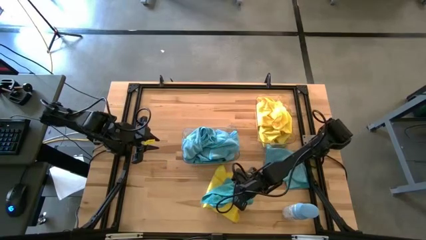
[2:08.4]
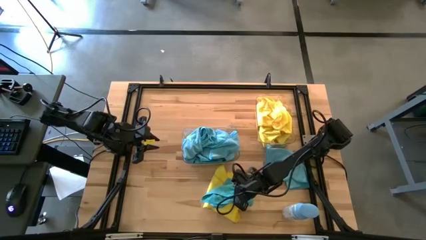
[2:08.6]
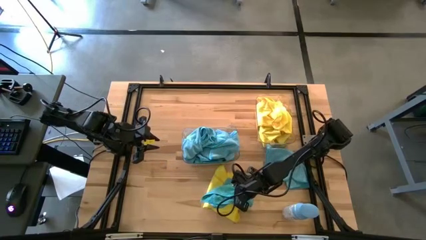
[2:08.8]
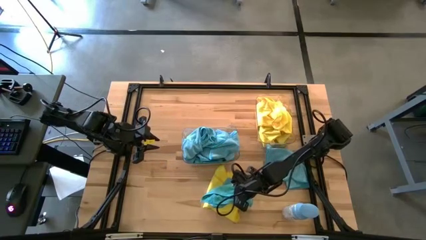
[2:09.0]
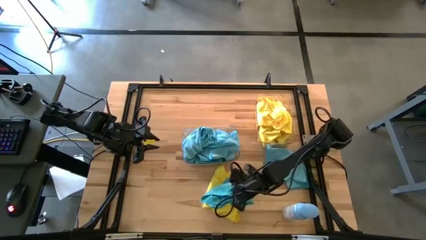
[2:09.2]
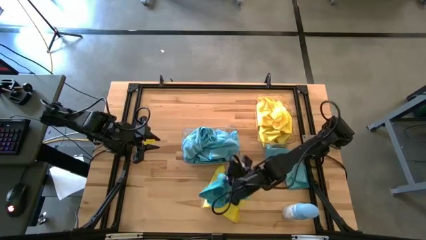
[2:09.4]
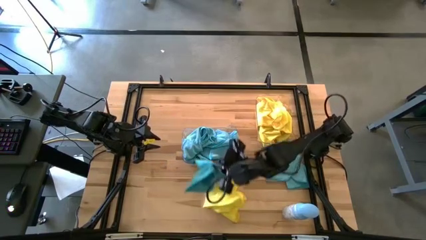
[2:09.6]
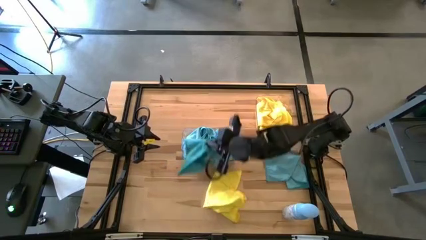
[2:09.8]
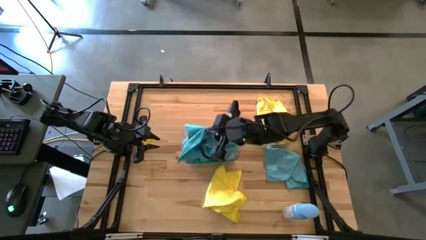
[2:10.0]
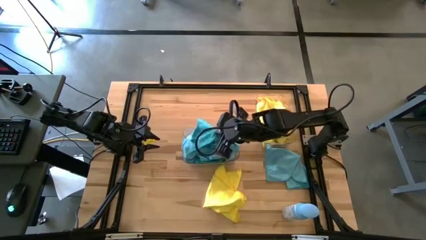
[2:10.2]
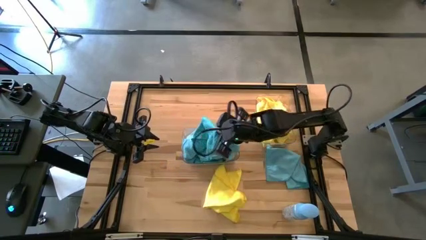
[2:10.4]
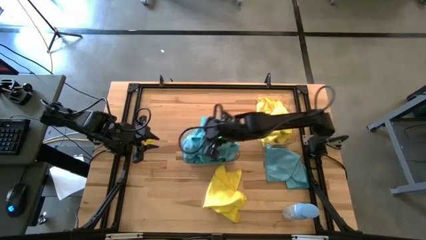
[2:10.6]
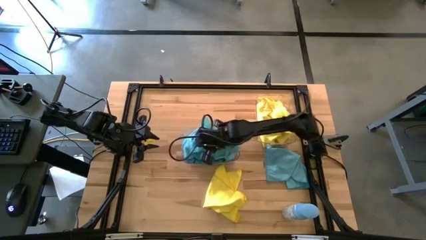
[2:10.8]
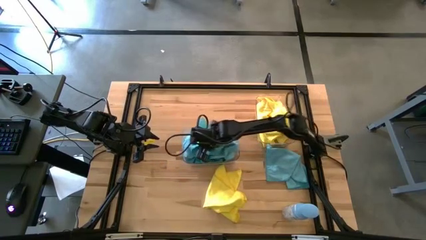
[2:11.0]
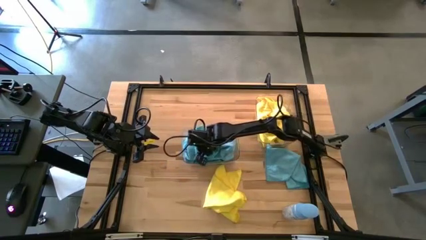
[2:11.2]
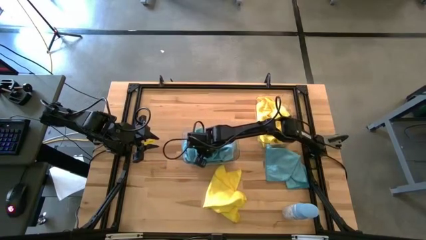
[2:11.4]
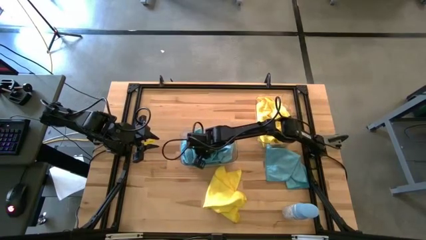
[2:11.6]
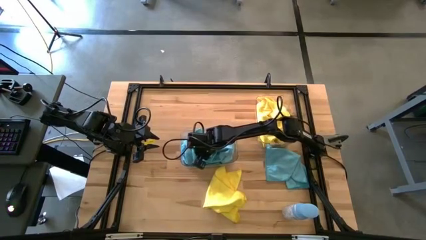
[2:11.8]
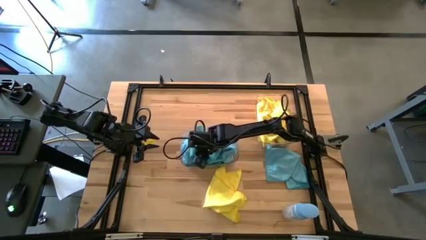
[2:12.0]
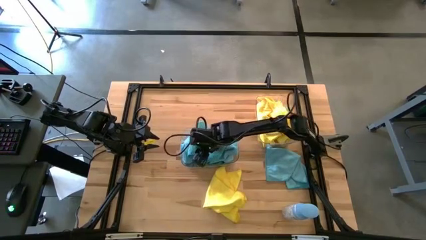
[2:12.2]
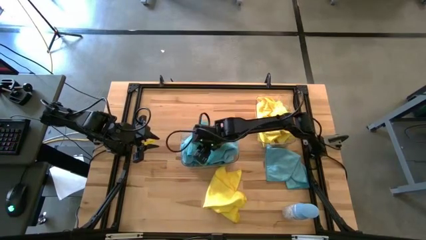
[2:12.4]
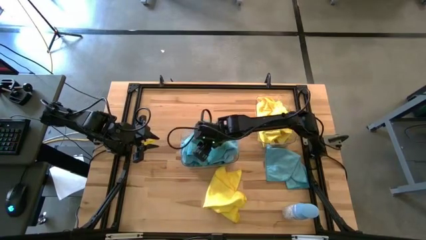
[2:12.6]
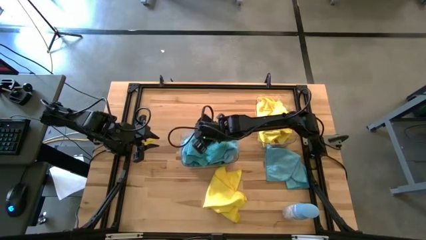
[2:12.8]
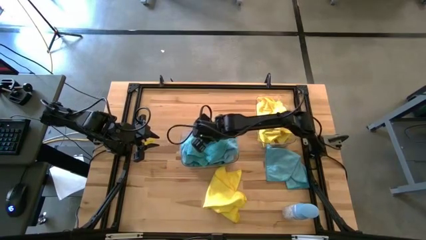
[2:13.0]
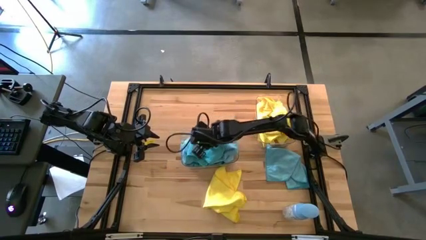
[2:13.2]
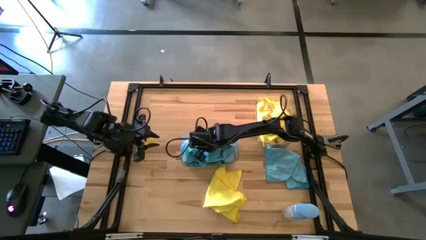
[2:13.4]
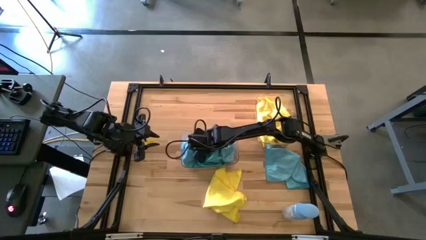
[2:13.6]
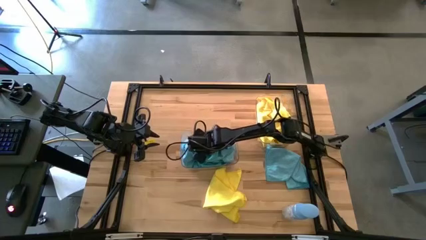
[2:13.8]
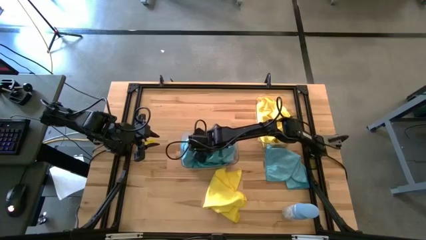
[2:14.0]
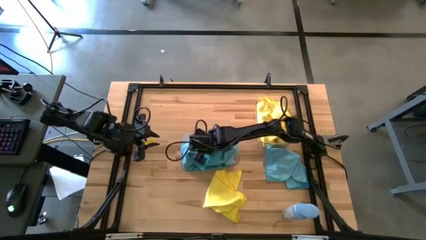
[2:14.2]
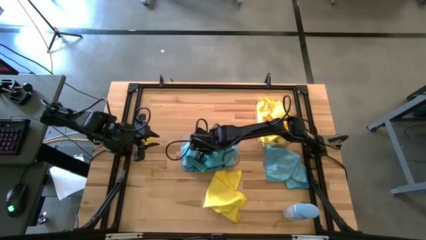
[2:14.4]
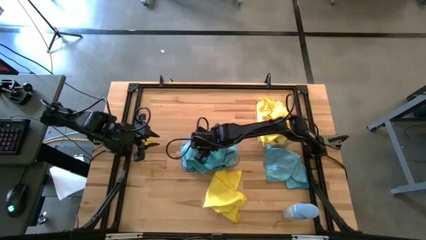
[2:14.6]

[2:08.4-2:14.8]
Task: Sort microfiber towel by color & place in baskets
Put the blue towel into the bottom transparent bin

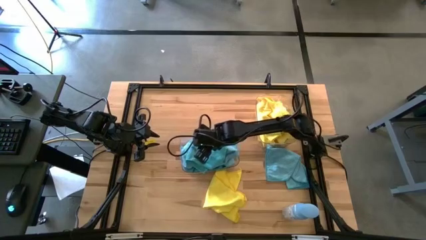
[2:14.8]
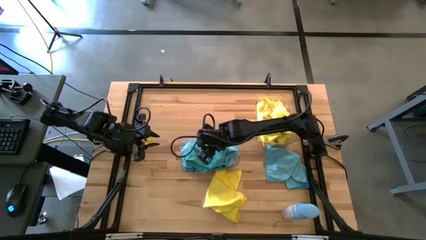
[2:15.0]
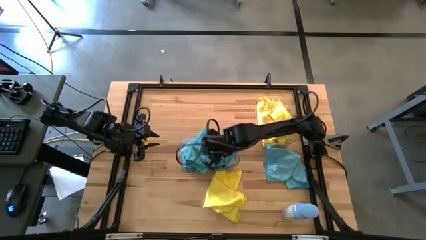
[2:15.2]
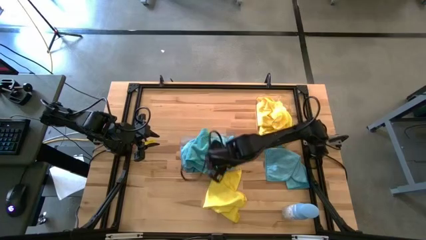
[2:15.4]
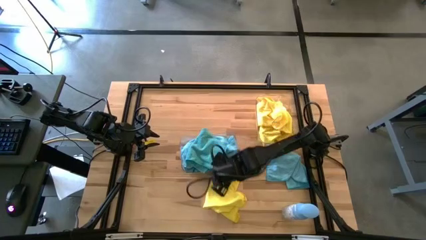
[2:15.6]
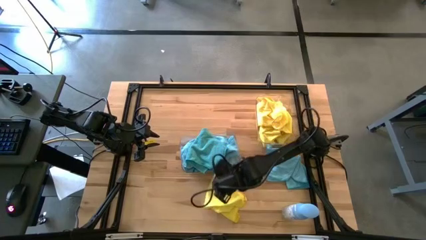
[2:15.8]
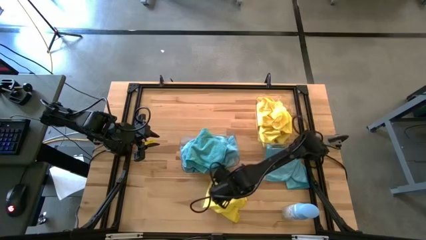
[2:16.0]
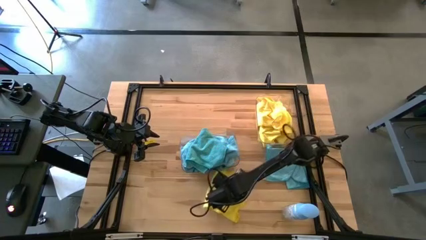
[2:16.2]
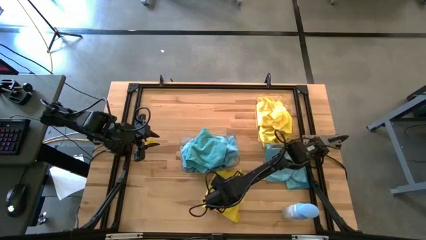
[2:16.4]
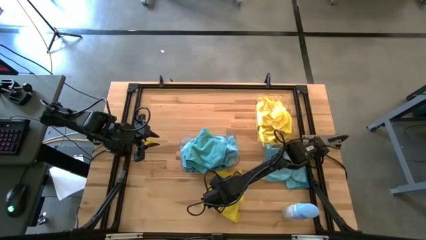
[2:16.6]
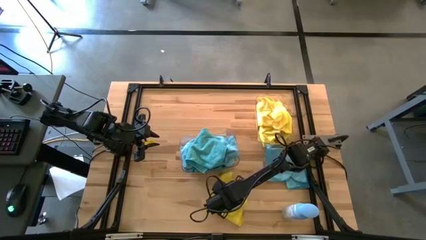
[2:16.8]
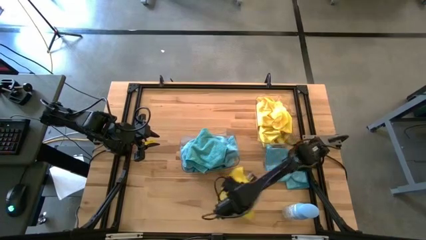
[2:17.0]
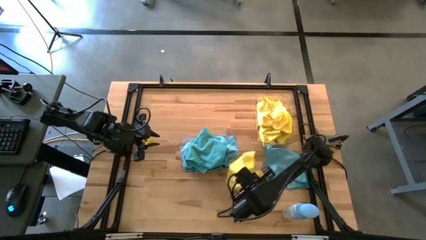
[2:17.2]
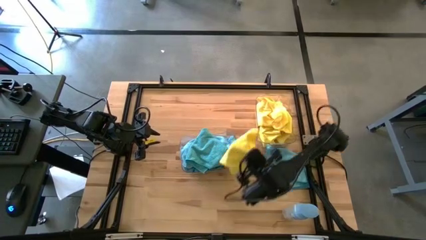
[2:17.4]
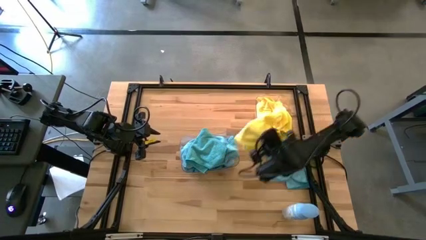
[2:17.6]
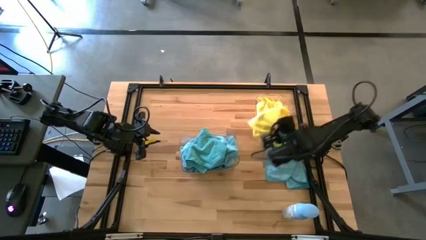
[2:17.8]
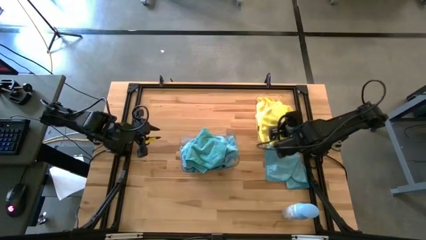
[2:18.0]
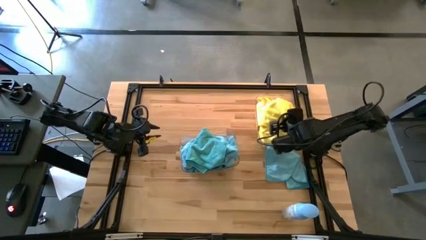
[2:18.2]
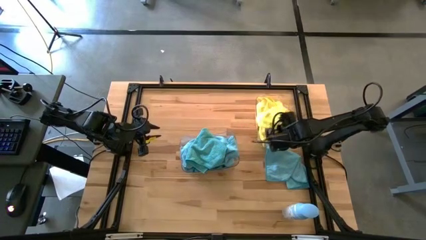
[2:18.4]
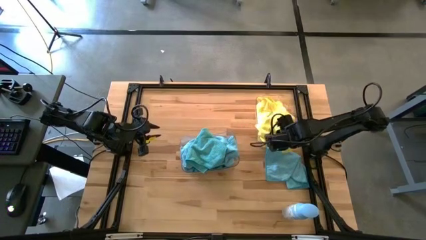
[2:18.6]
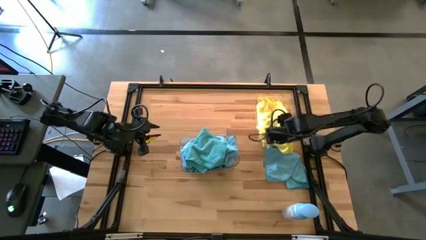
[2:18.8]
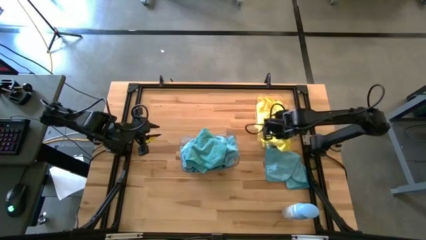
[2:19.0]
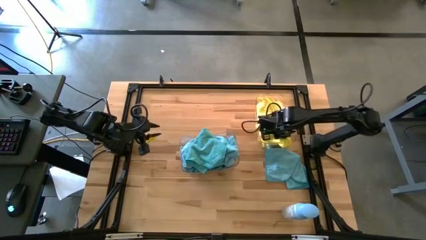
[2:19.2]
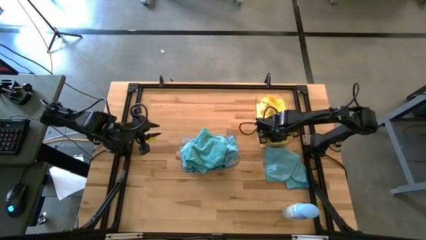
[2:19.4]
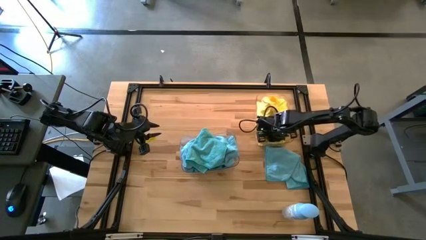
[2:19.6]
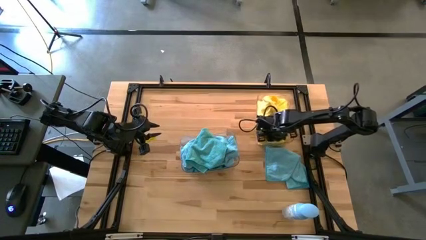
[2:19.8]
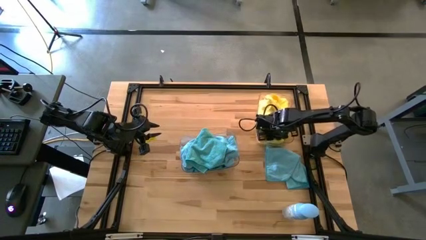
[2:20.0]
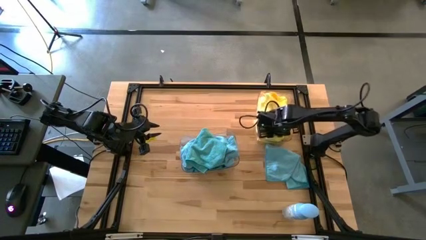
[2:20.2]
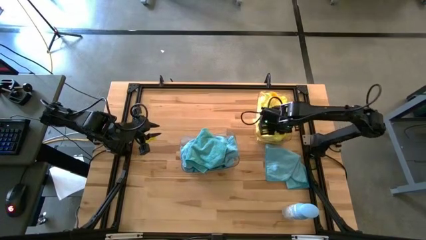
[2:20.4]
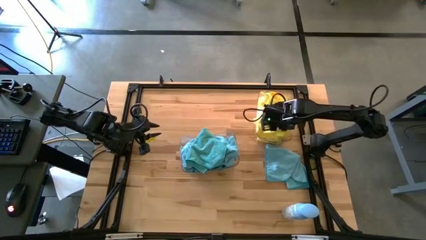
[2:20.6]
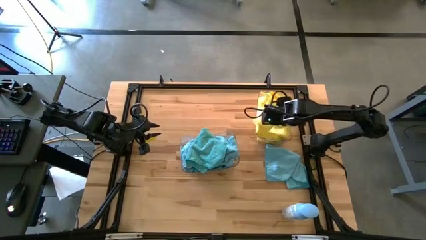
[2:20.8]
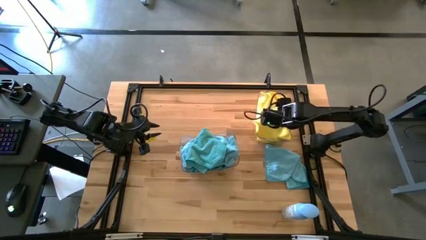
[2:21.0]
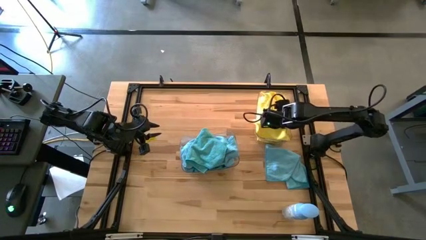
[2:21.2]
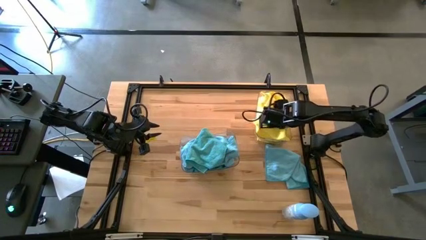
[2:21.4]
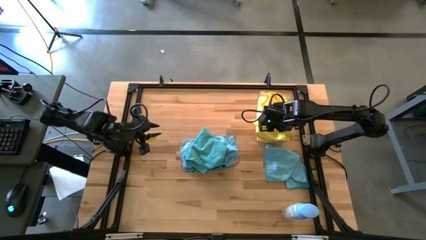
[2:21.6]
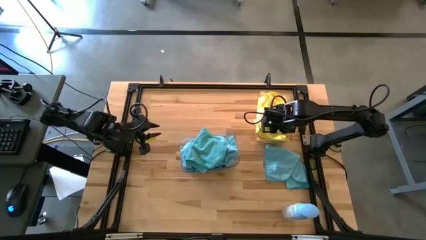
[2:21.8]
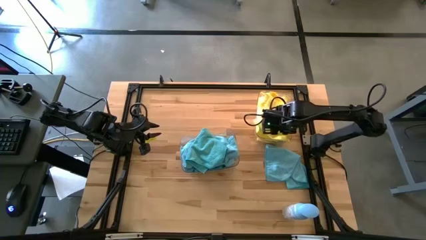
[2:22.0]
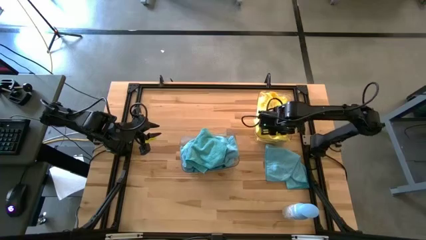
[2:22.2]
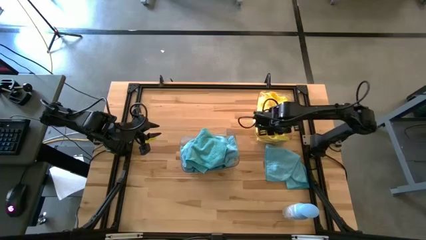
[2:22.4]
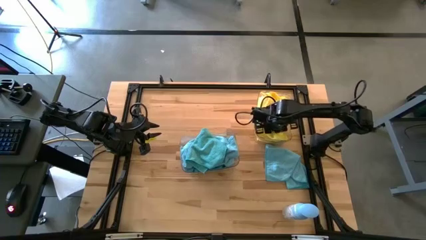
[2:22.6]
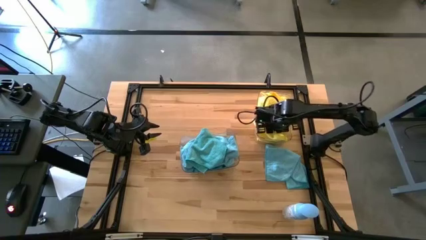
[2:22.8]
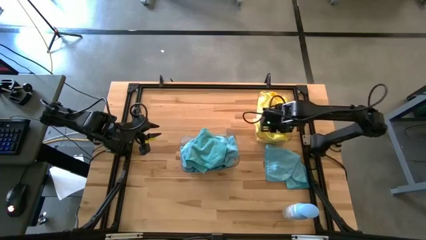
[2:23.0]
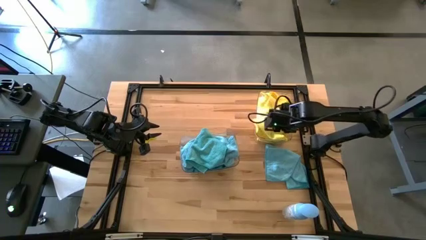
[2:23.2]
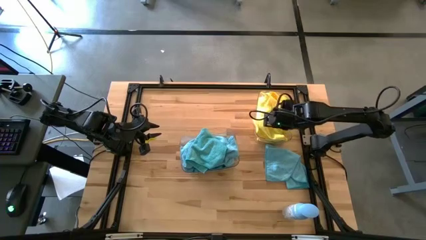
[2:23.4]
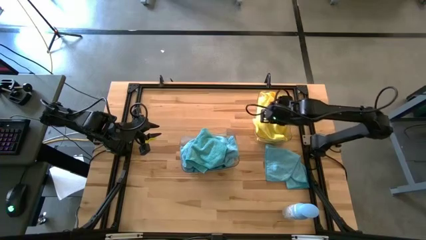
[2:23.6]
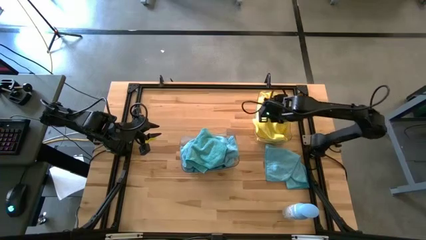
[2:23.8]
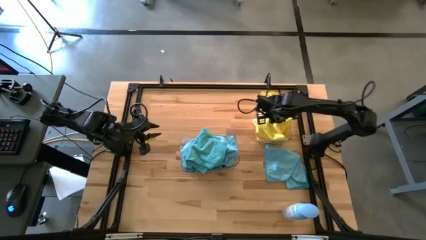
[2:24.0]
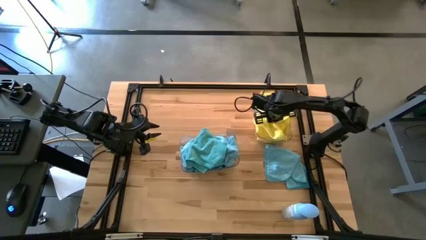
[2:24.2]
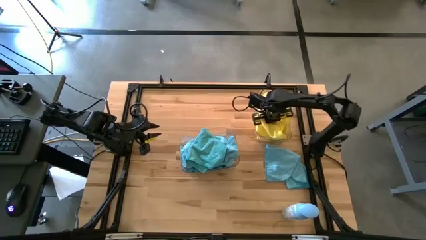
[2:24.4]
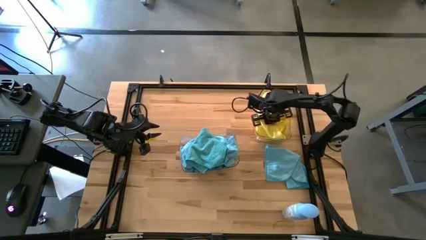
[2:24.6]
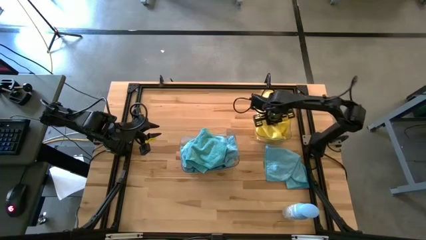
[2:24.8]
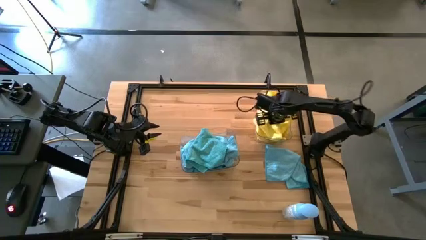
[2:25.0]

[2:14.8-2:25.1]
Put the yellow towel into the top transparent bin

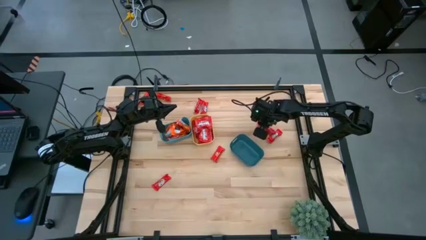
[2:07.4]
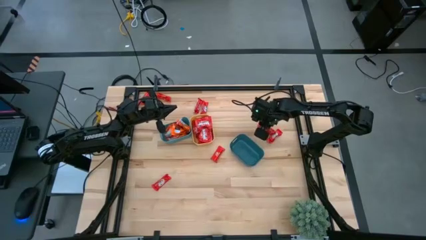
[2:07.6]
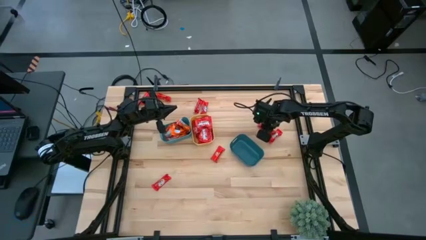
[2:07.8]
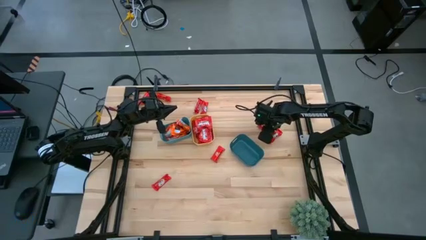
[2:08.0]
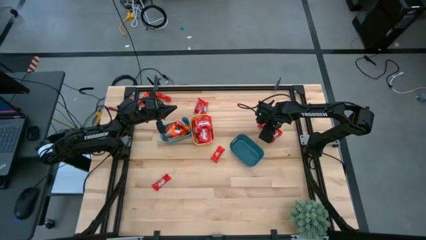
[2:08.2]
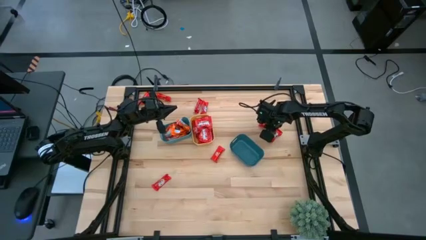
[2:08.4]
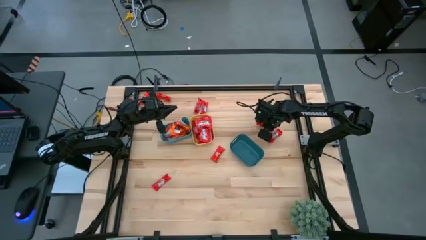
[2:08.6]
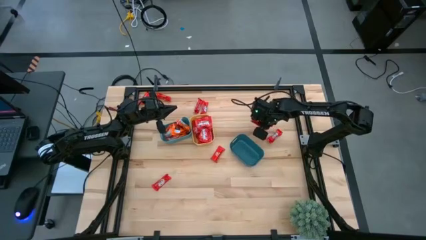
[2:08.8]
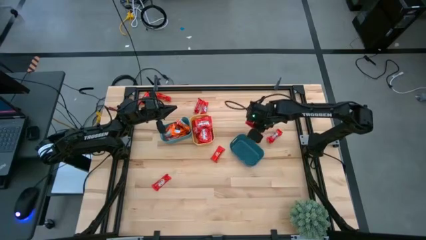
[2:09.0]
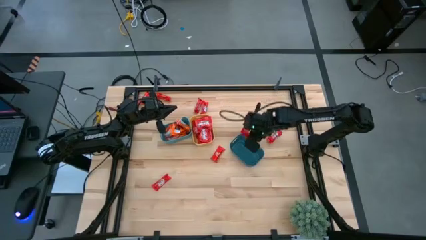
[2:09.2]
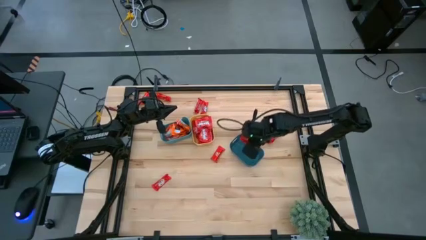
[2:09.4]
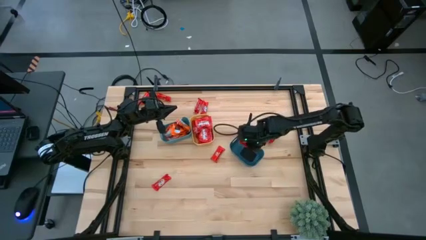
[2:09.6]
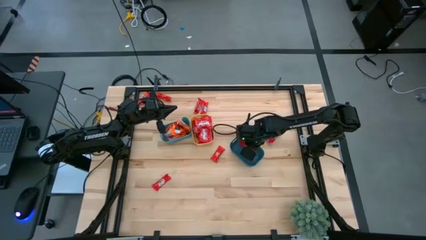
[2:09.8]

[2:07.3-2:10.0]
Task: Sort candy
Put the dark red candy into the blue bin
